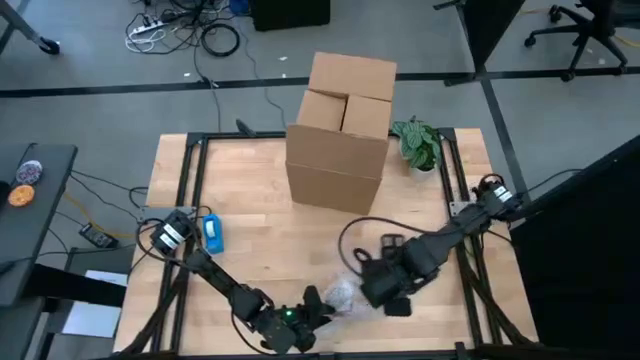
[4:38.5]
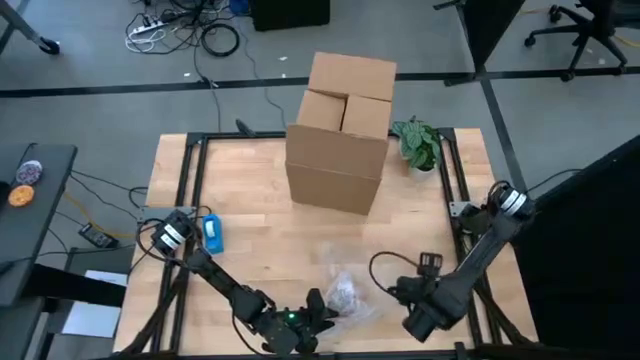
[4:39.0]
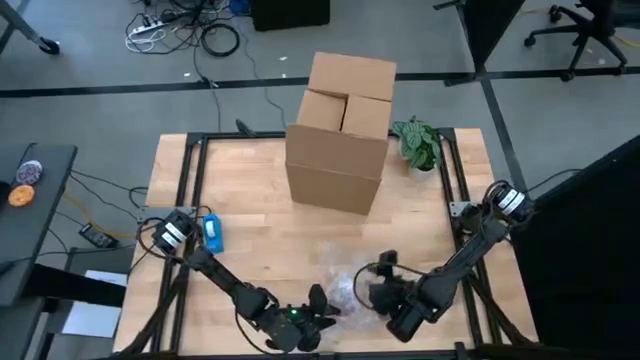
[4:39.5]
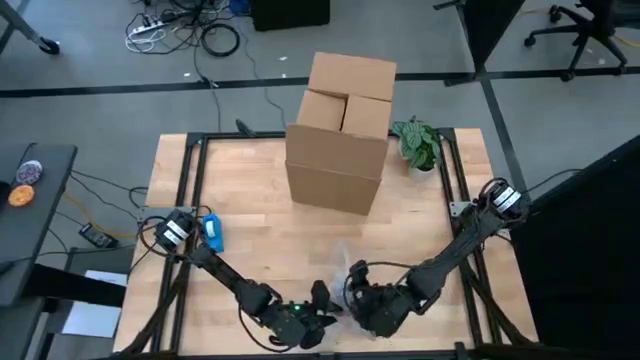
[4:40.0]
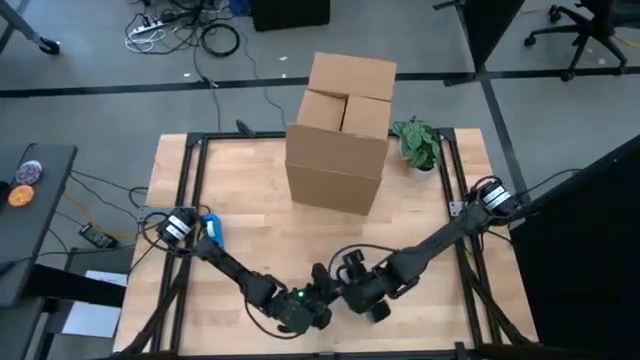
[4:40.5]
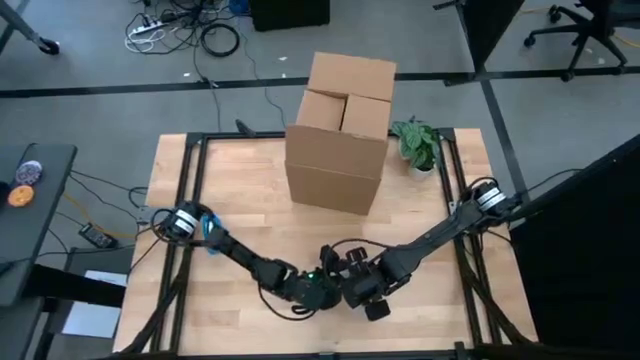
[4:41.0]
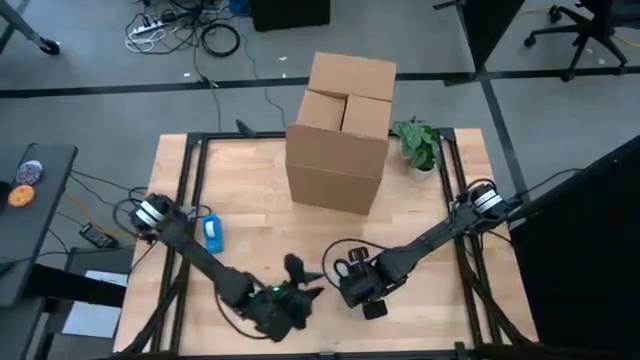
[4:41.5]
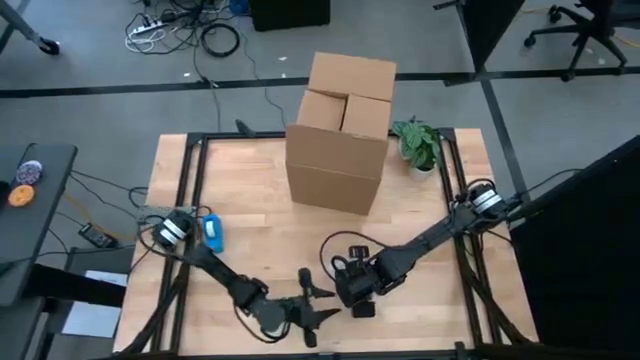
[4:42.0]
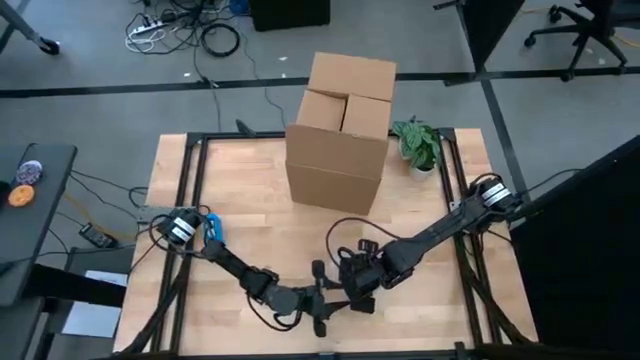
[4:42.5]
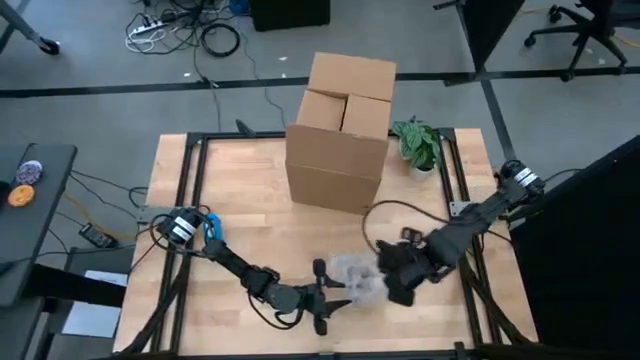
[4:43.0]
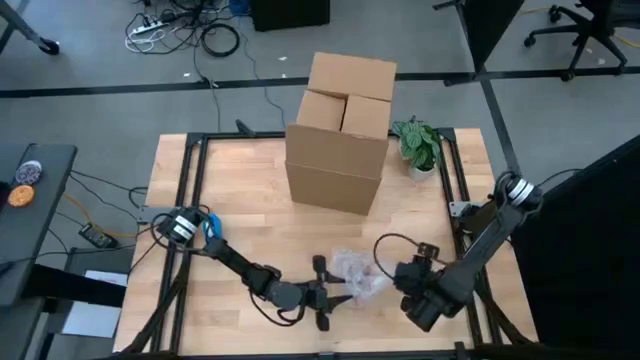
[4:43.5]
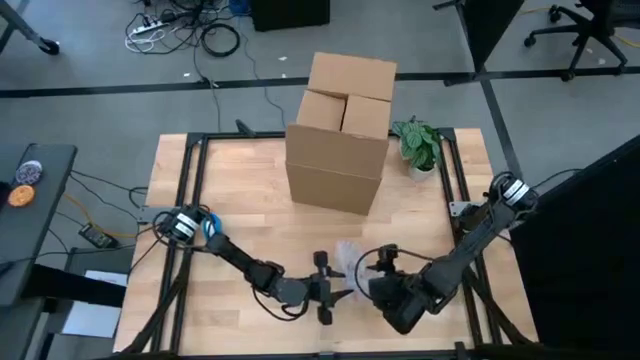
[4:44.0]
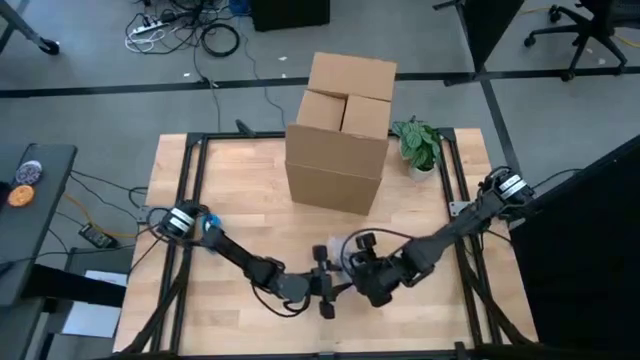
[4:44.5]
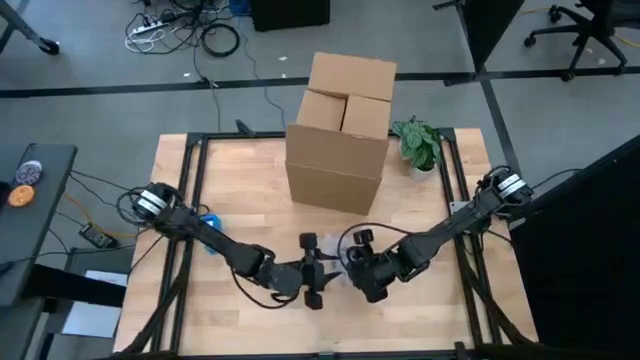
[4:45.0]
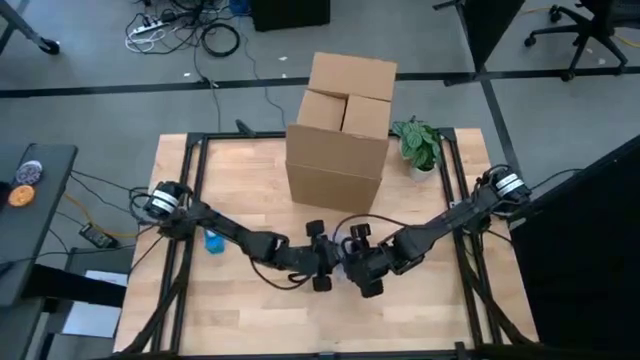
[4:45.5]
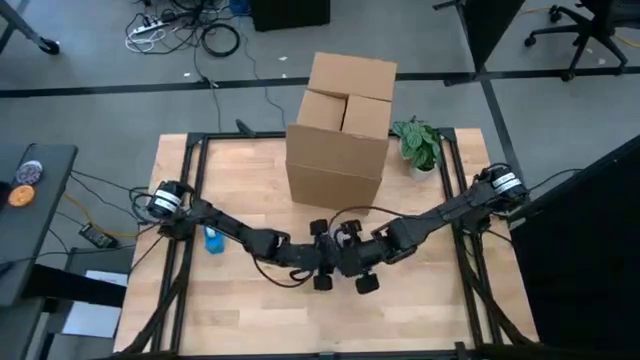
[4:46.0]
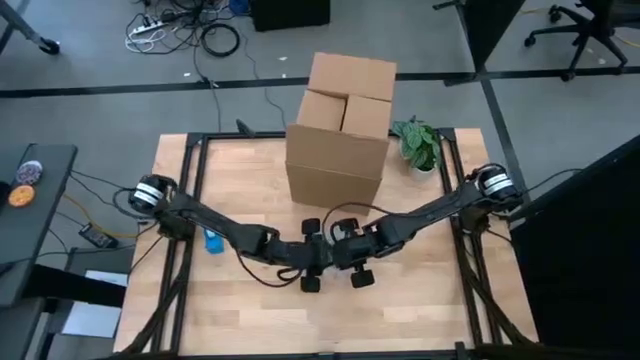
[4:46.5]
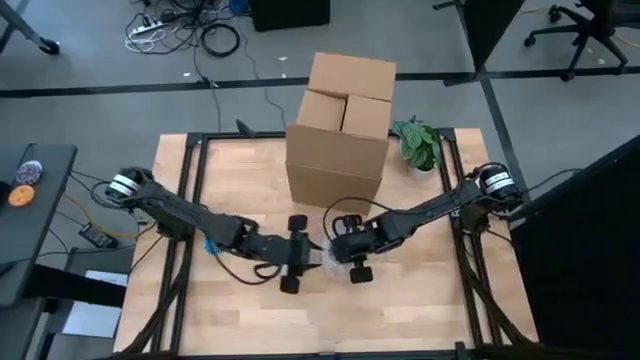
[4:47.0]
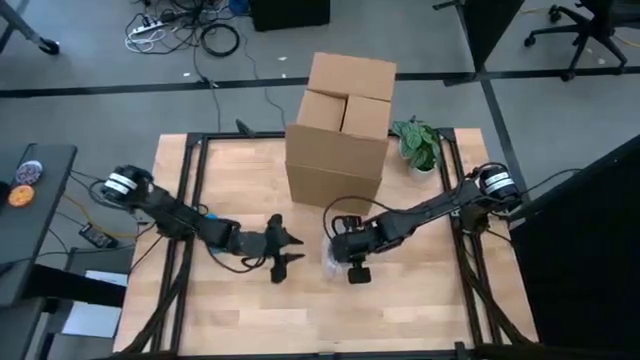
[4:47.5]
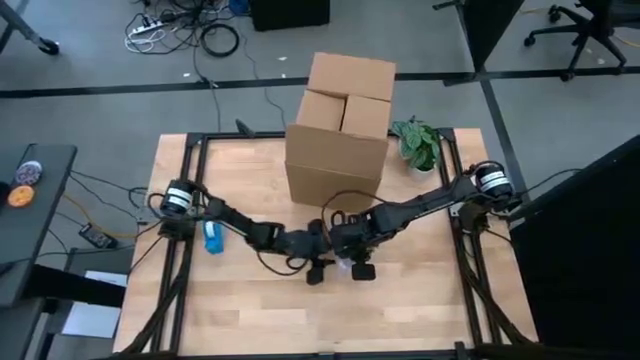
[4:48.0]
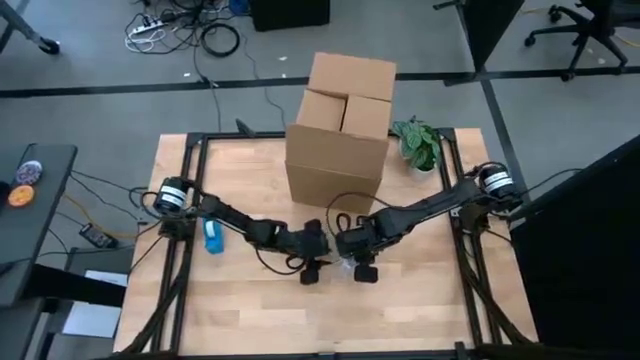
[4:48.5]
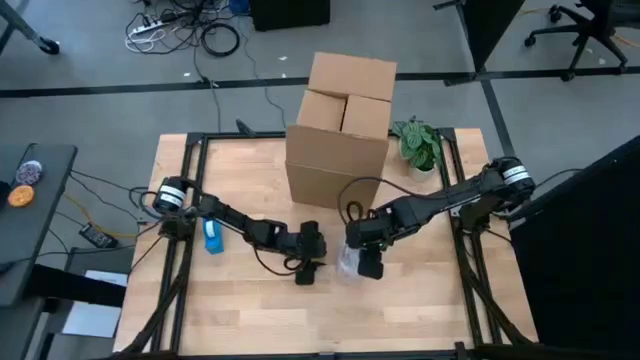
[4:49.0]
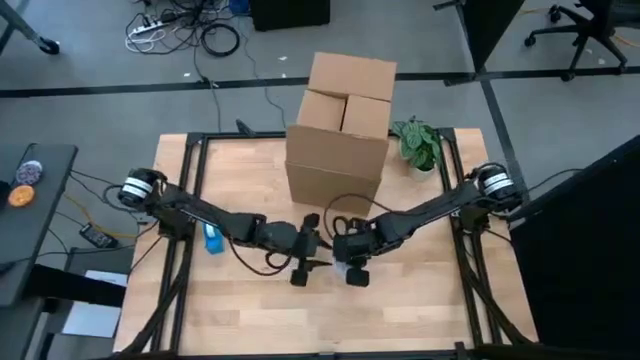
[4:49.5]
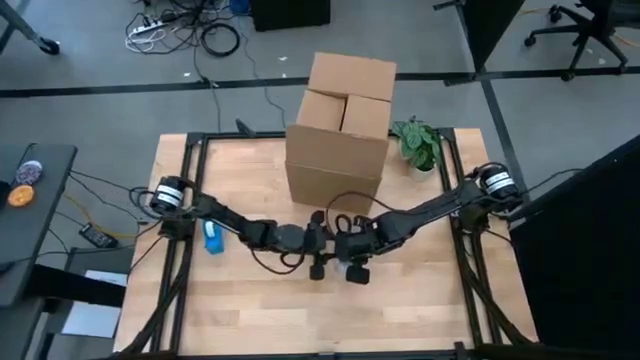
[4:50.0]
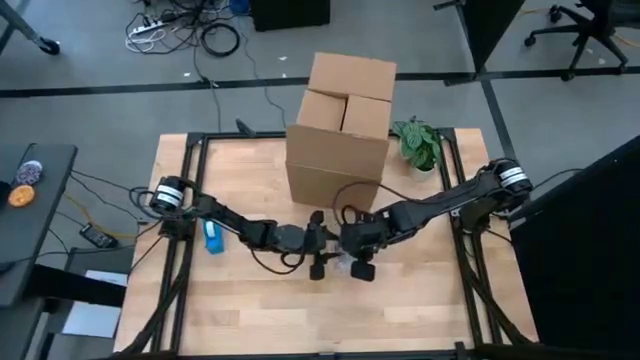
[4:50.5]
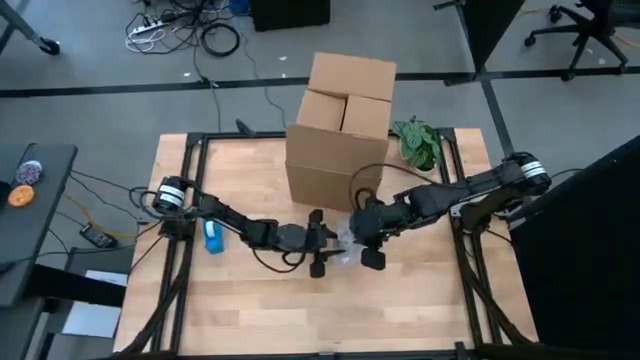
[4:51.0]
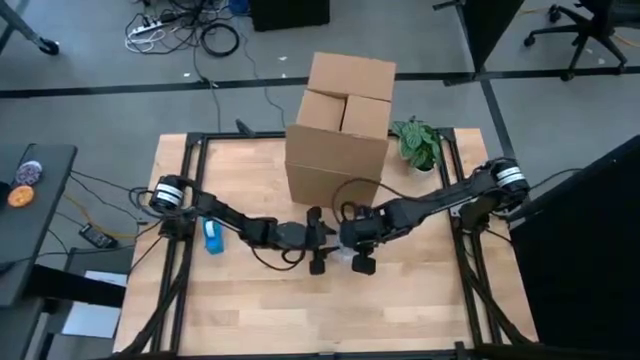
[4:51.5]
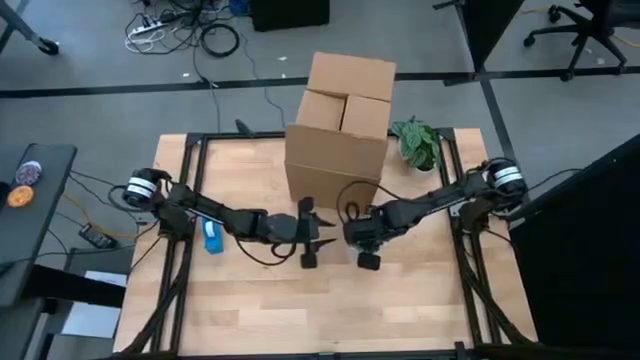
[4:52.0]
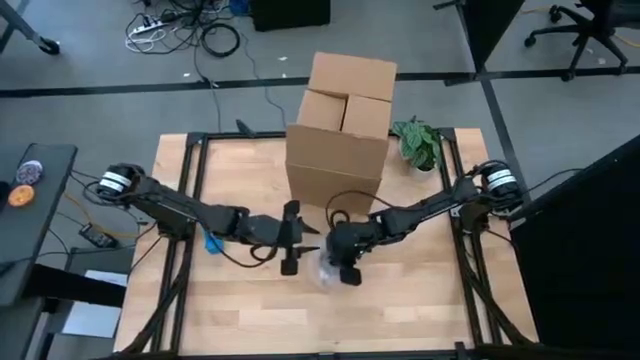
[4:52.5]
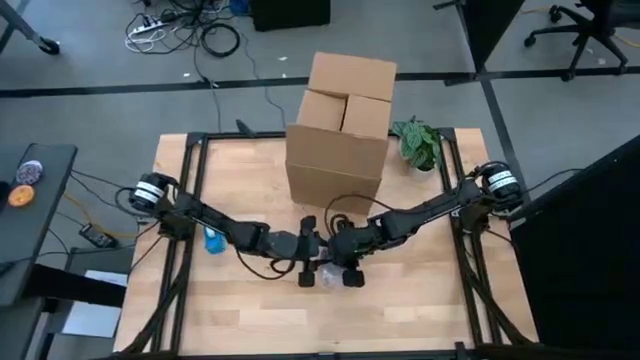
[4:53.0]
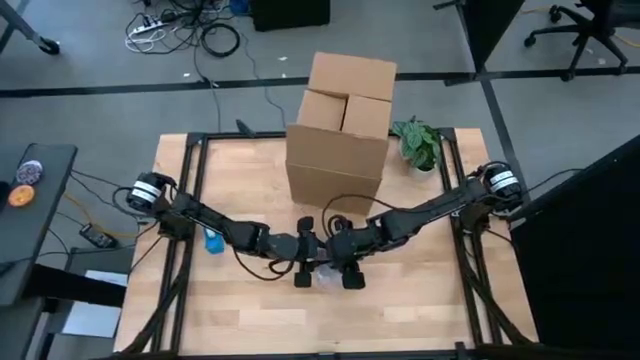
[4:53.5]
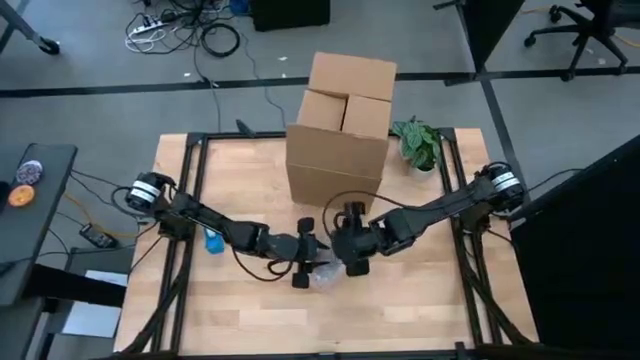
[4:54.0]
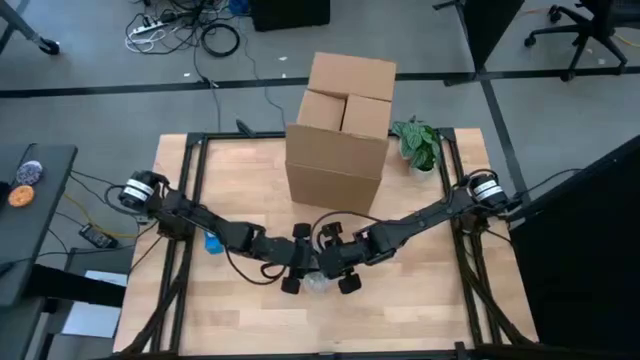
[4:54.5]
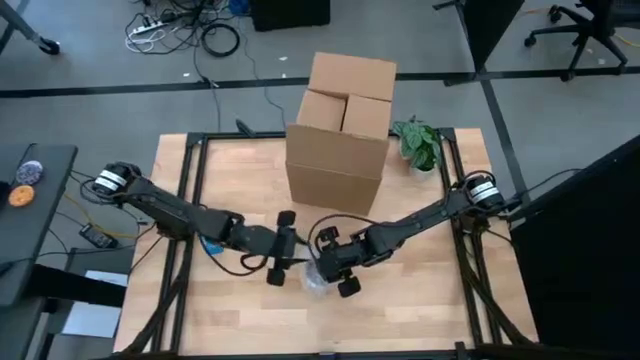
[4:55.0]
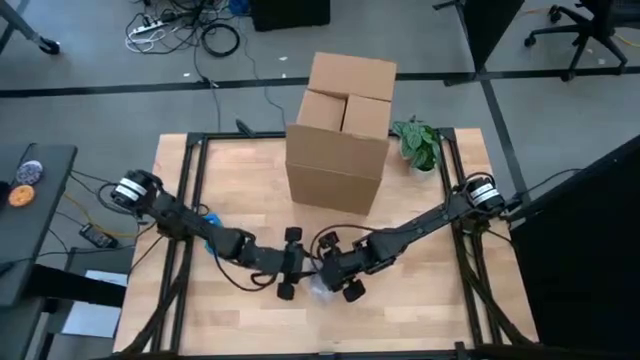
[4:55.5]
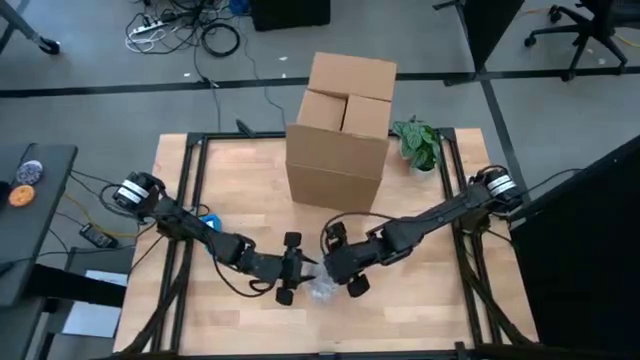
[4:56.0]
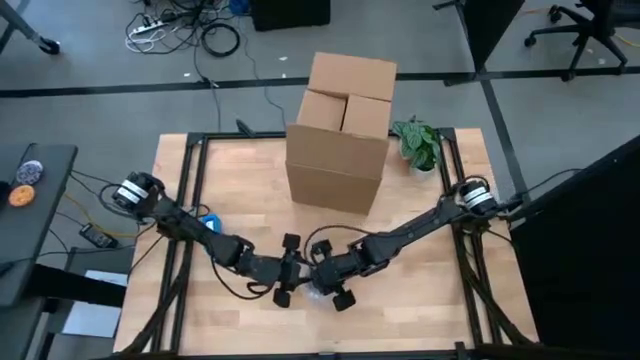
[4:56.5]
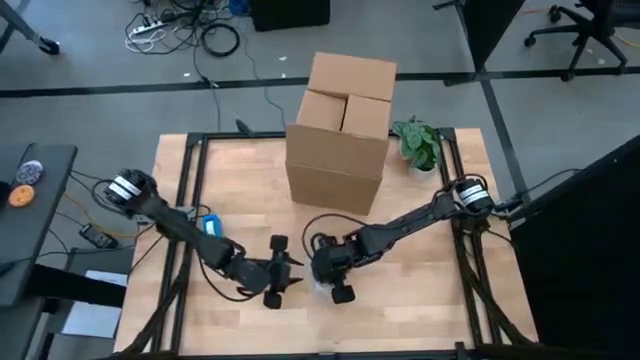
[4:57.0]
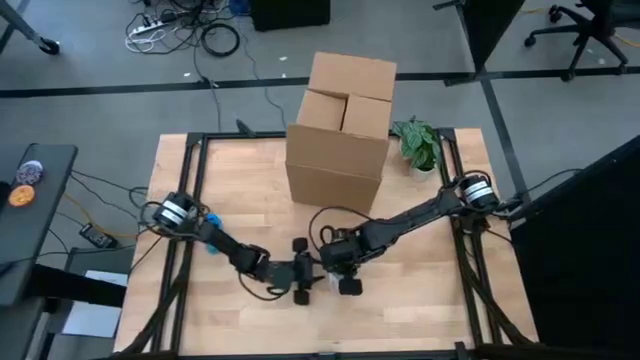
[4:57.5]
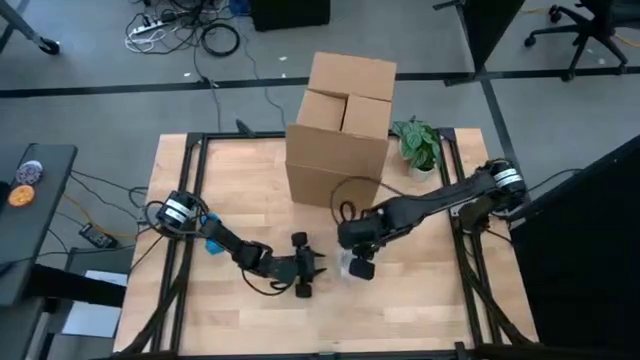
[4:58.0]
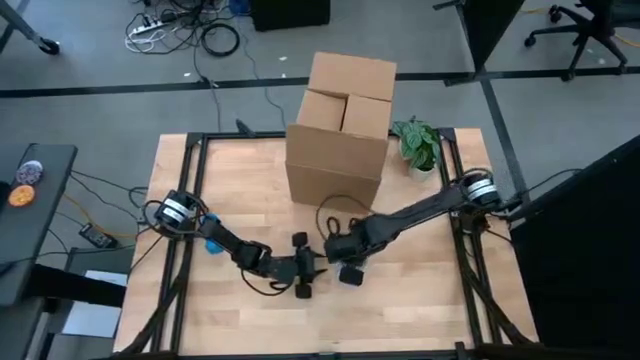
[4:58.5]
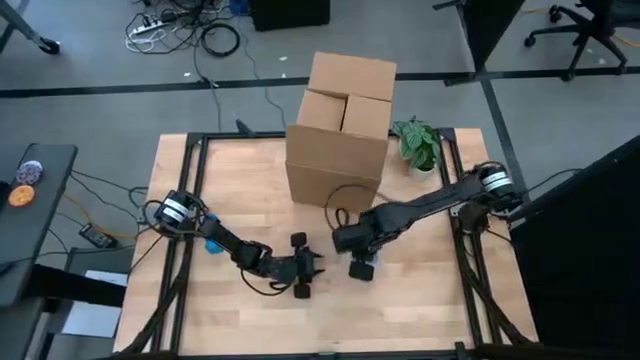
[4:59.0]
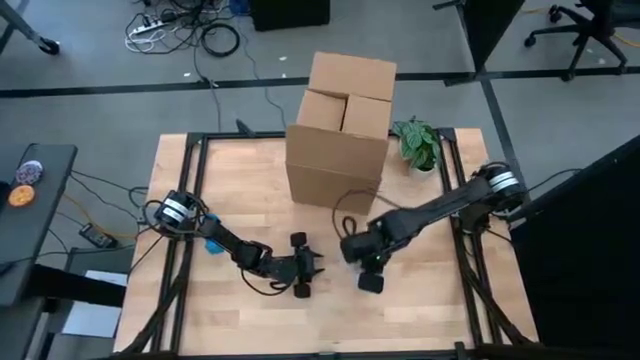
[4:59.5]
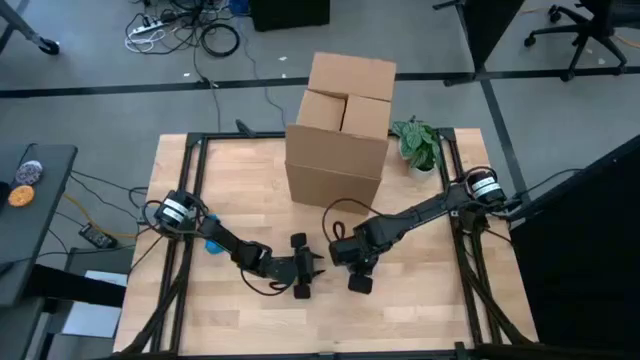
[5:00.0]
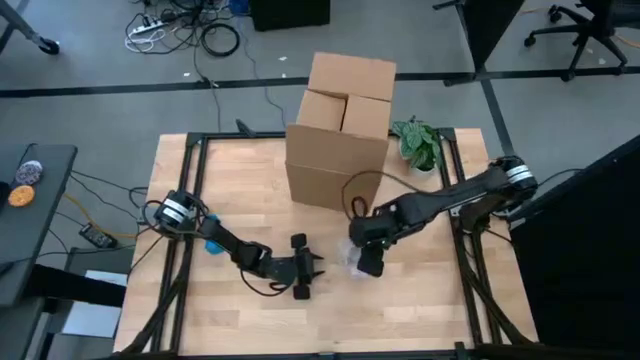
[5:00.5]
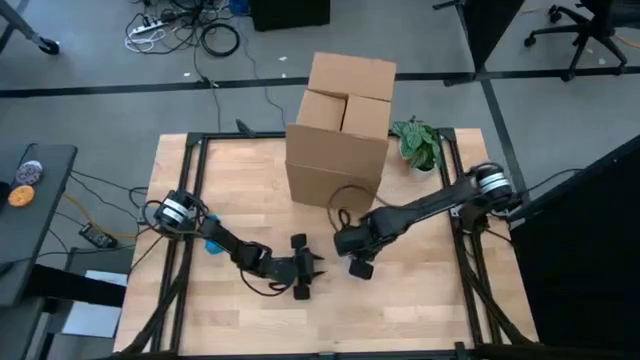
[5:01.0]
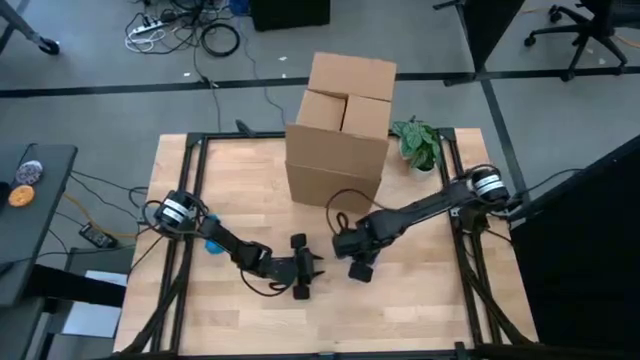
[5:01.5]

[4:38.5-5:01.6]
Task: wrap mug
Wrap the orange mug using the transparent bubble wrap
